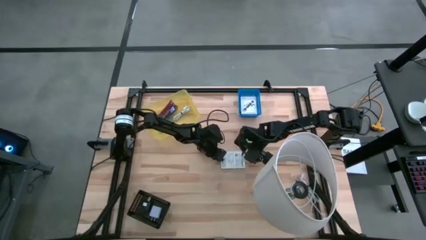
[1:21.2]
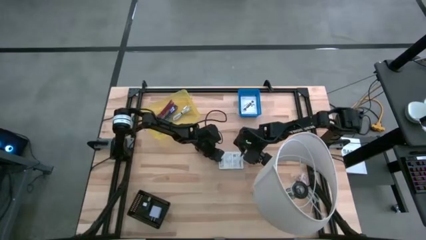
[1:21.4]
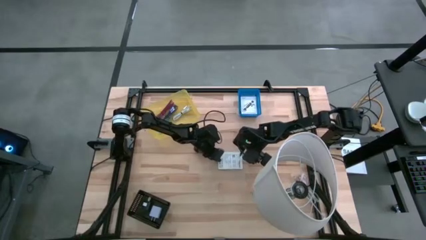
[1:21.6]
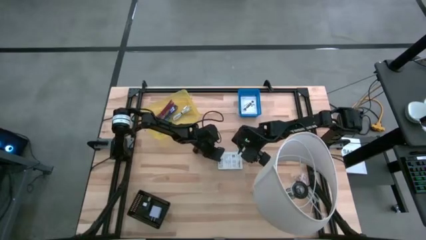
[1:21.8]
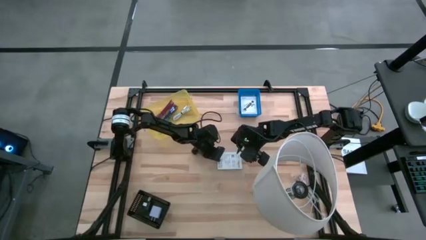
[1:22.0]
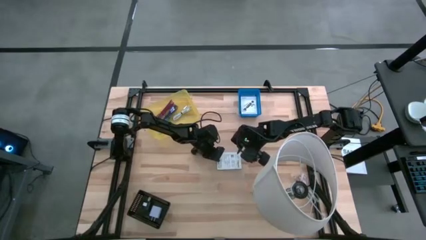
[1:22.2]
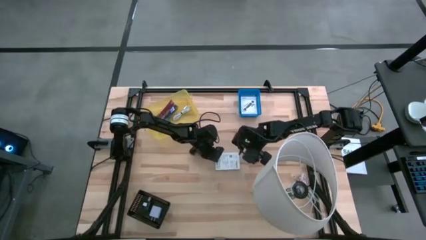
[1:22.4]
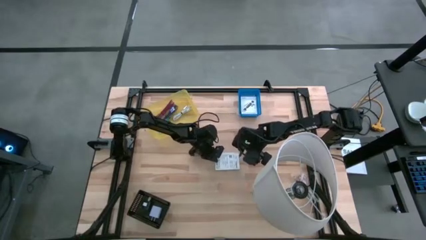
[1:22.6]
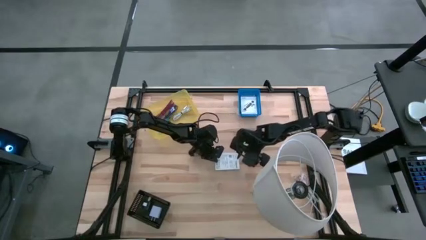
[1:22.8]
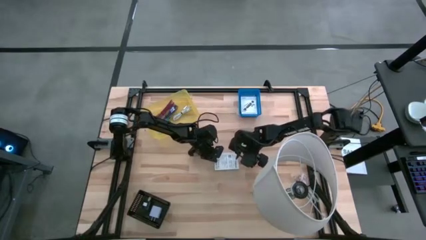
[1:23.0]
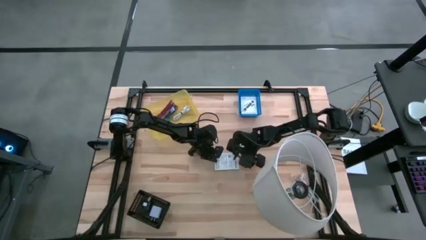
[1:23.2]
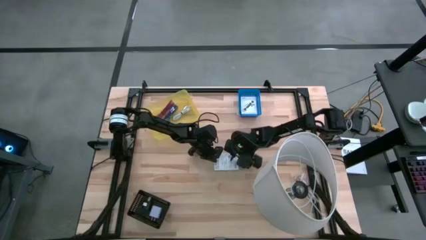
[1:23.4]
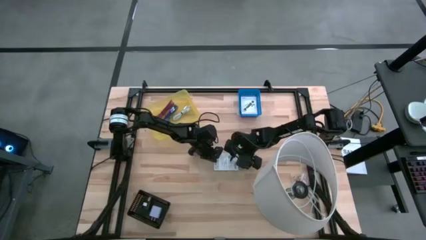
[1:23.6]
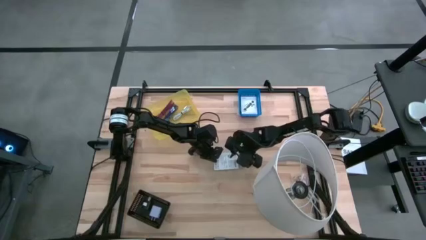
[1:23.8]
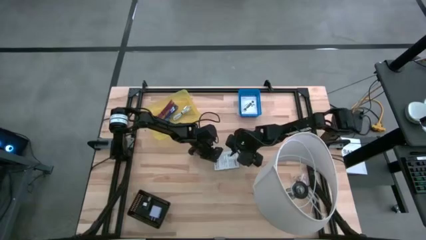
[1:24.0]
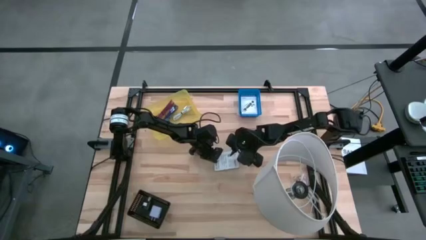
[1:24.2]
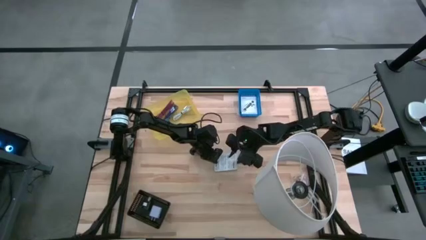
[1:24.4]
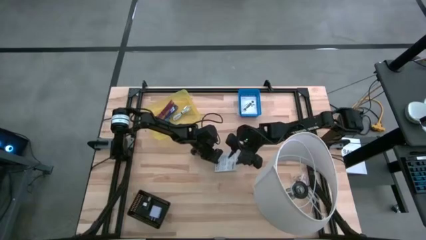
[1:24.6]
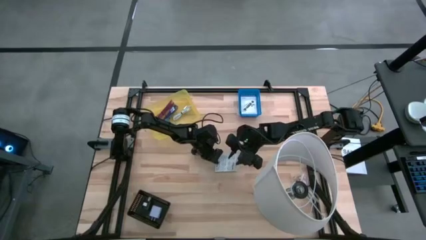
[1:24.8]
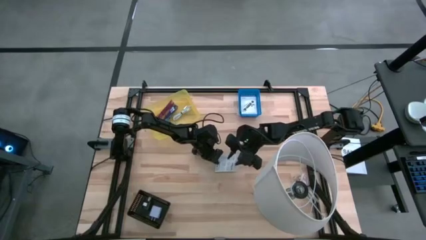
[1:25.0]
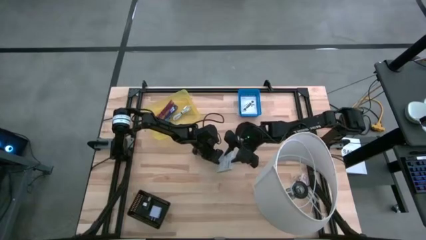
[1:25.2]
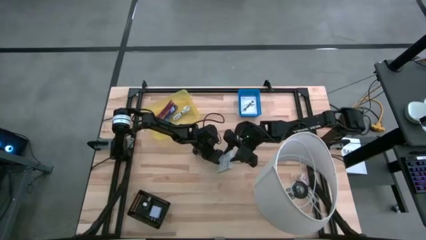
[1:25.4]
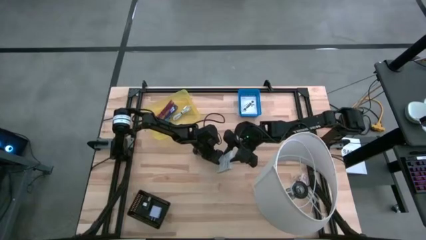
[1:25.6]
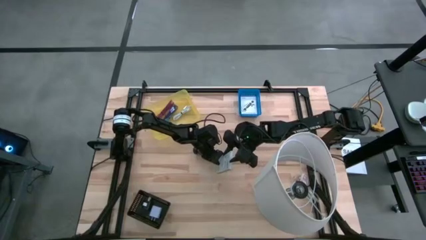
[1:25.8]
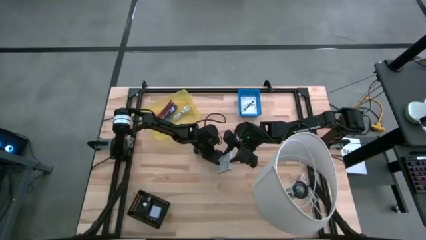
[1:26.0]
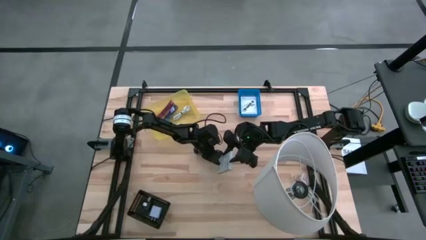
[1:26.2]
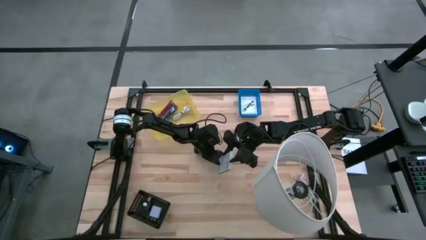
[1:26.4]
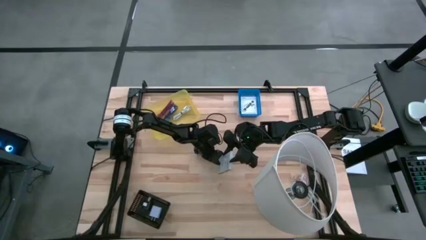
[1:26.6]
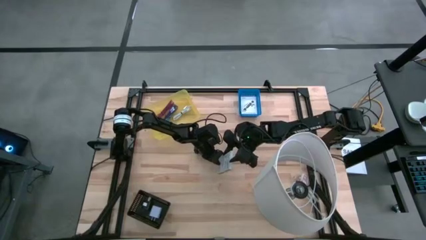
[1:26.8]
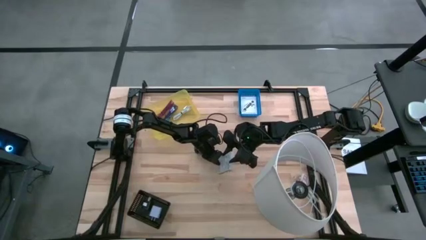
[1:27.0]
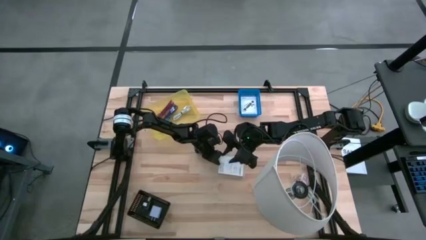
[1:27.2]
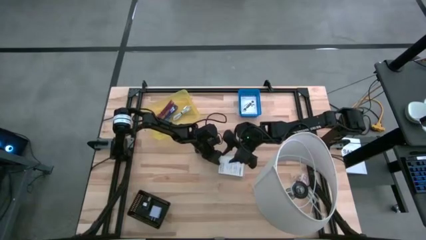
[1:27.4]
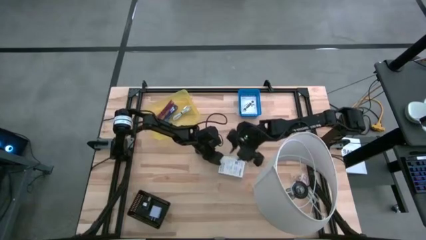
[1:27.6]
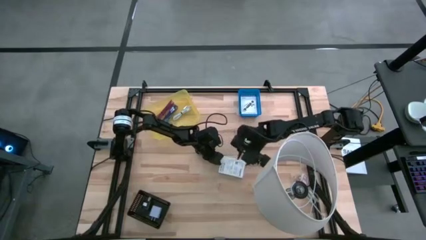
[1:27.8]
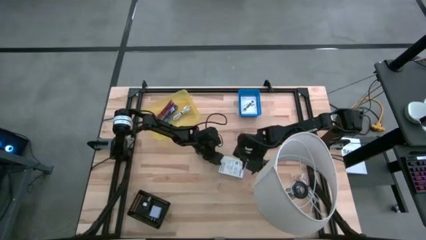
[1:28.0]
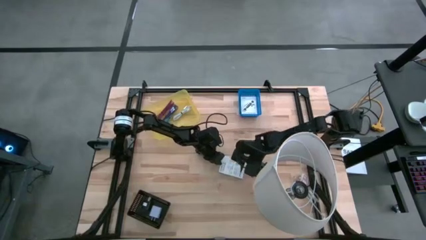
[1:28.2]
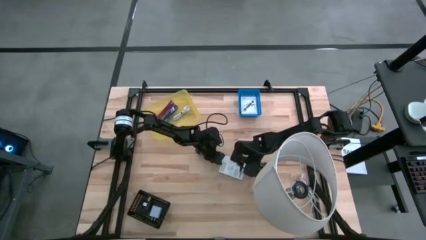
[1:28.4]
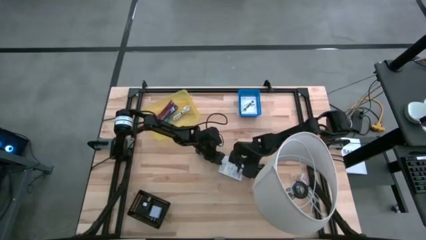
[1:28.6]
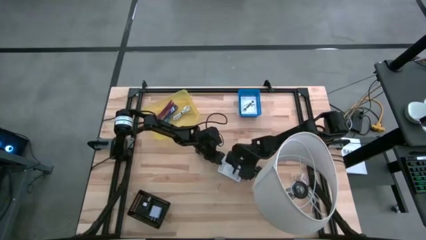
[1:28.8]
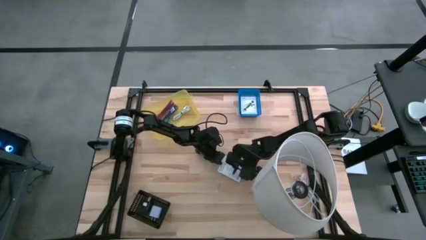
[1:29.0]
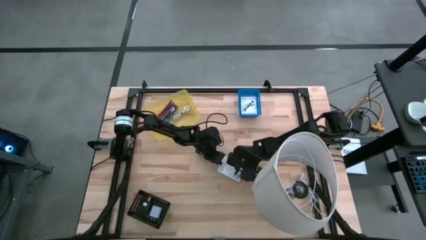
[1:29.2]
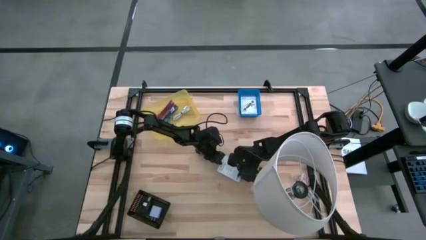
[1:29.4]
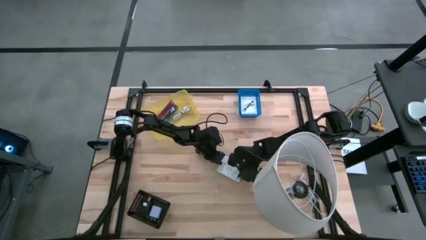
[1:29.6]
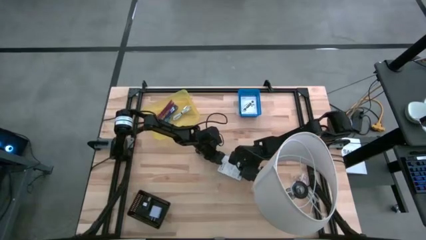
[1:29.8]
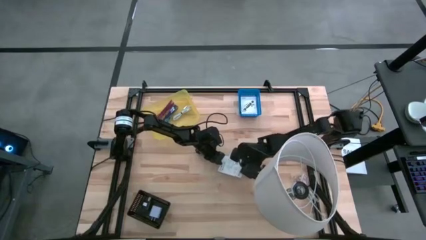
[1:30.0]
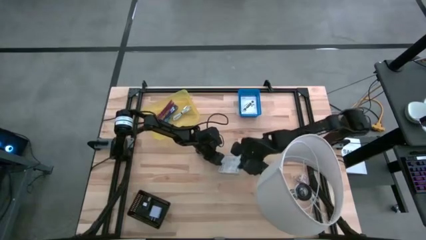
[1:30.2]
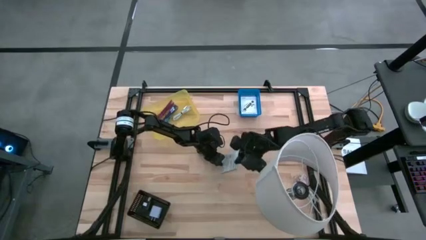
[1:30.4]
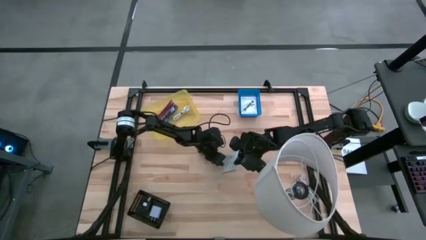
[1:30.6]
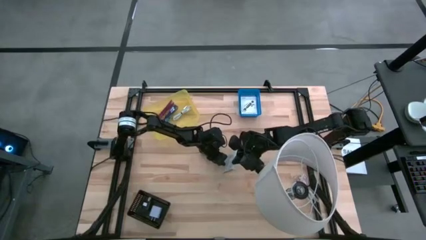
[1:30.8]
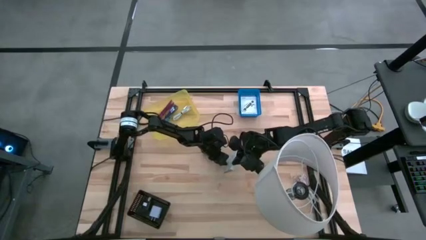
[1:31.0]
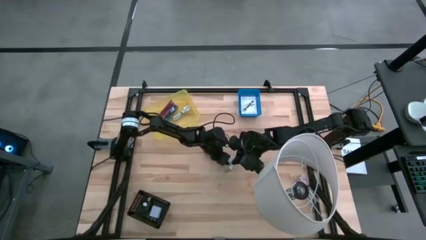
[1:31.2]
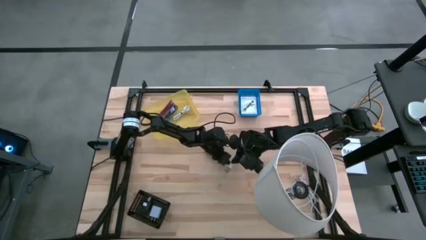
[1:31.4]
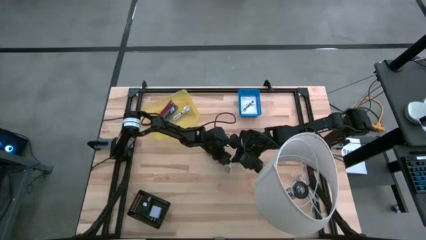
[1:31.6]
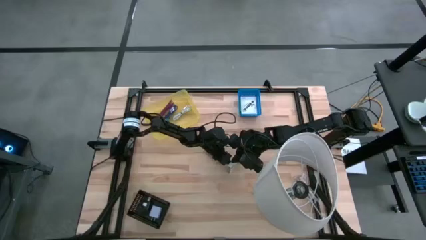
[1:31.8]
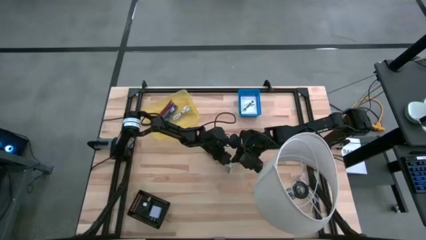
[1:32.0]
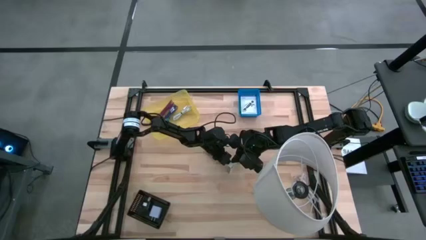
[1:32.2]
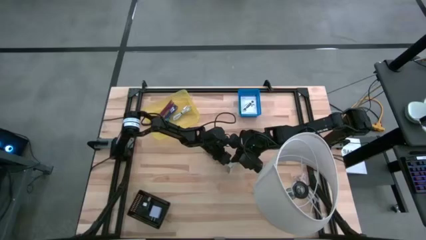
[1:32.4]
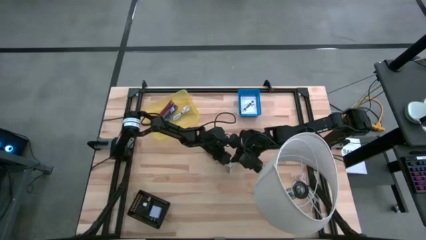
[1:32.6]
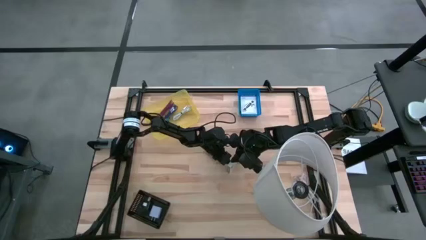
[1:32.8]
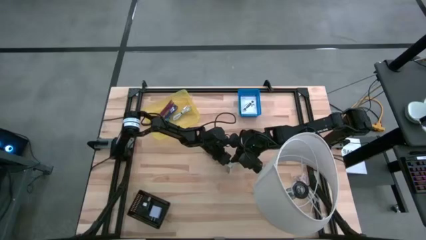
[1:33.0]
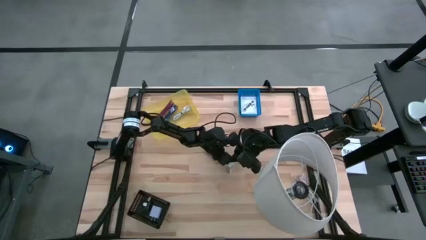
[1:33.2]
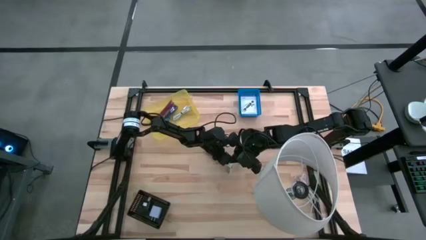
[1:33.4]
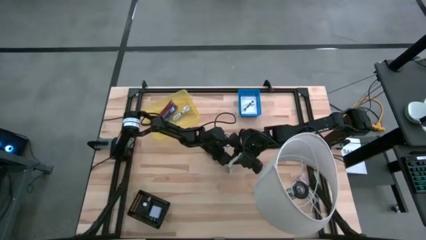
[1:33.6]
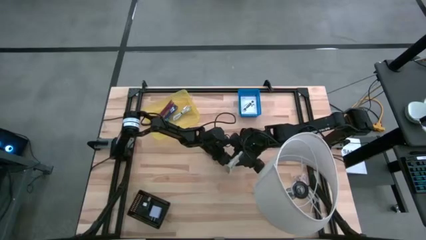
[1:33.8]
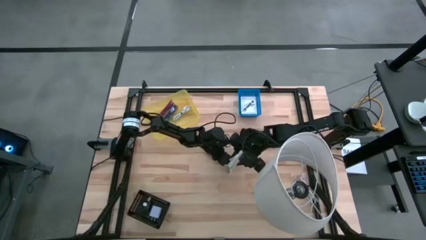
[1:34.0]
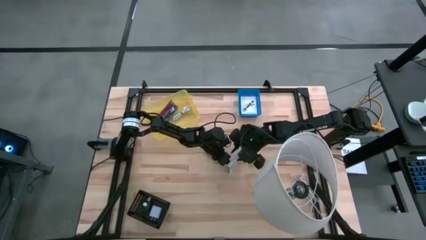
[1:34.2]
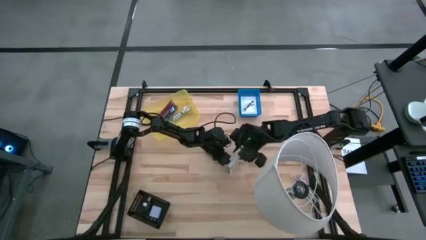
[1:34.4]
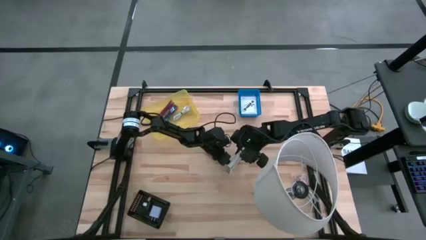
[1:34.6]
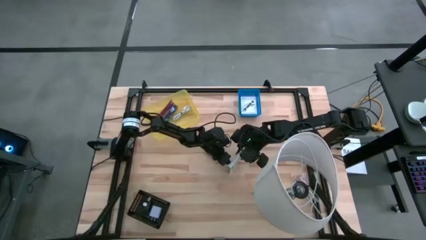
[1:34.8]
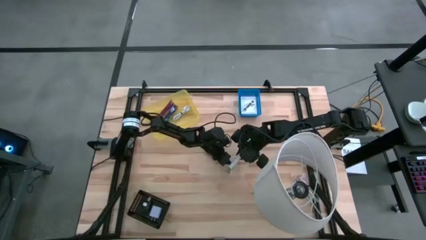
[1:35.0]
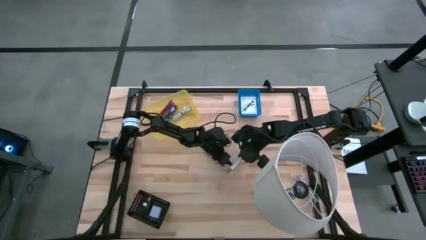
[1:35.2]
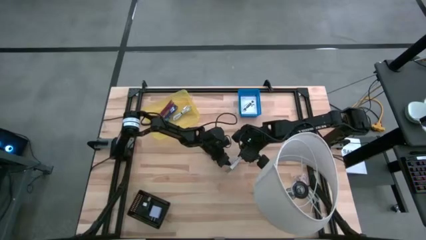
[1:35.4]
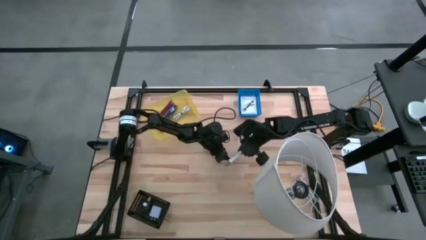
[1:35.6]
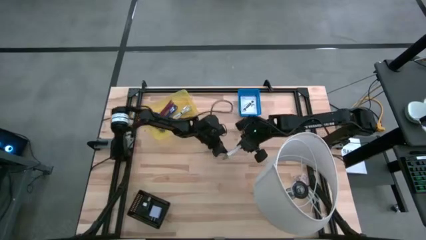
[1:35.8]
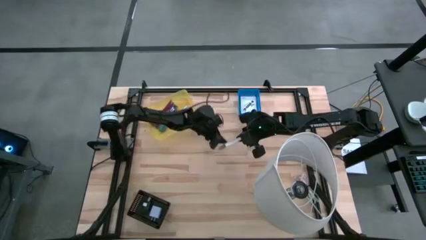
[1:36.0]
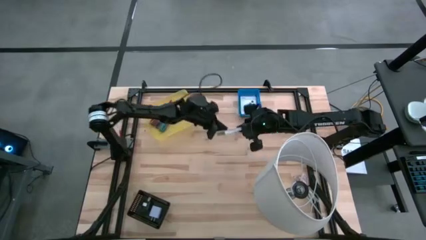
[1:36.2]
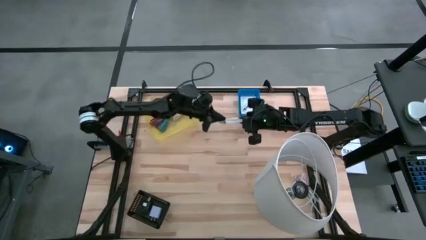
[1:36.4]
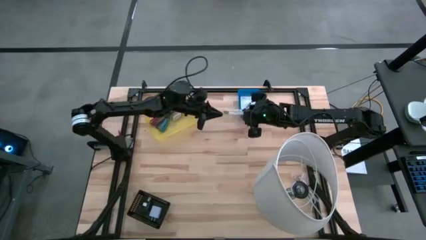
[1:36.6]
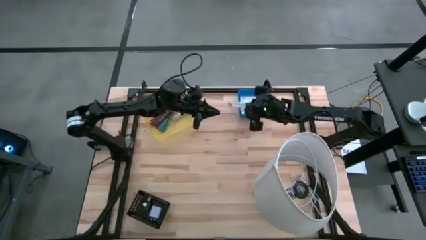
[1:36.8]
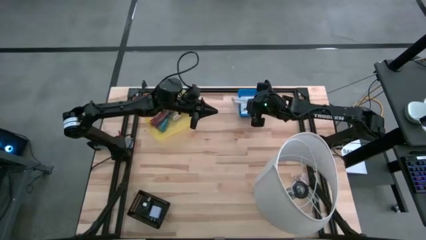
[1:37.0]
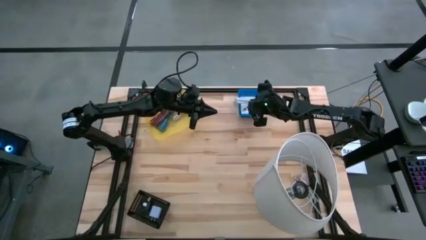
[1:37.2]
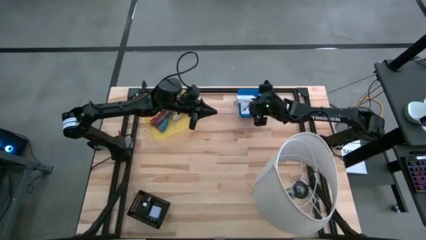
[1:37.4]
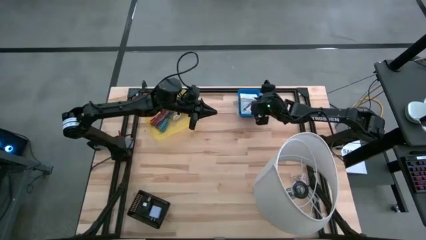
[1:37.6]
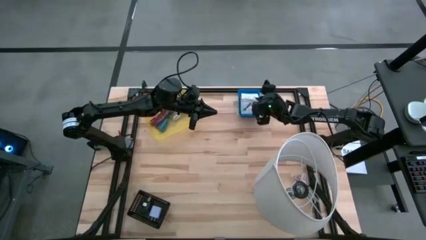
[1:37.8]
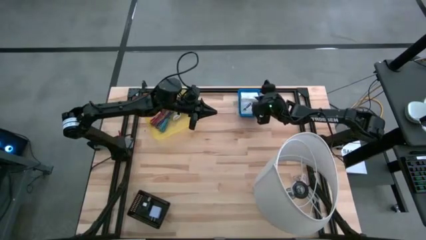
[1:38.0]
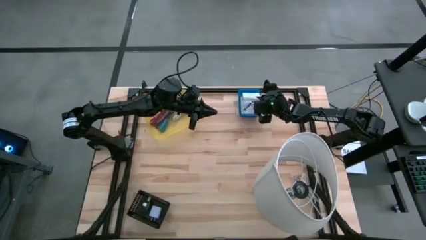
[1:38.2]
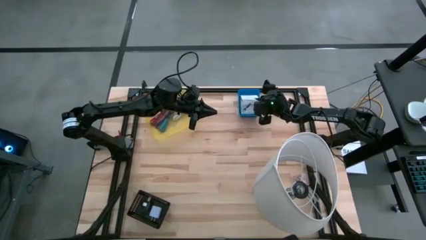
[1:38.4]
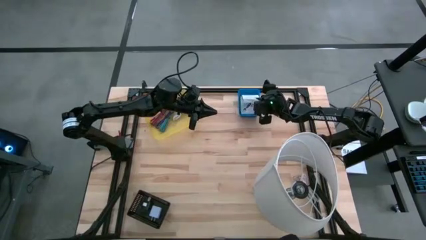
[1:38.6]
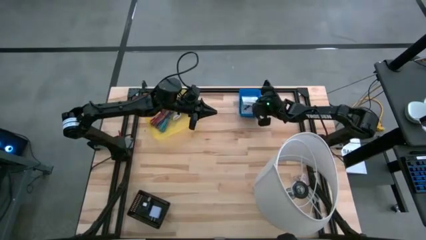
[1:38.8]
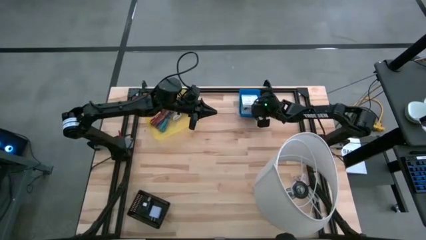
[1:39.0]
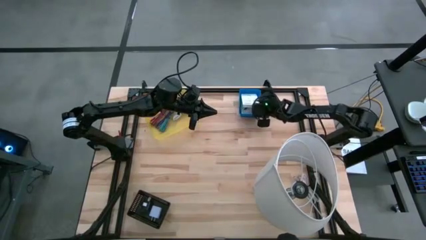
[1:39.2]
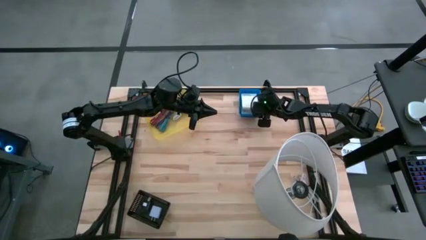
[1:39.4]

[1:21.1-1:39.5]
Task: Pick and place items into bin
Put the card reader box into the blue bin
